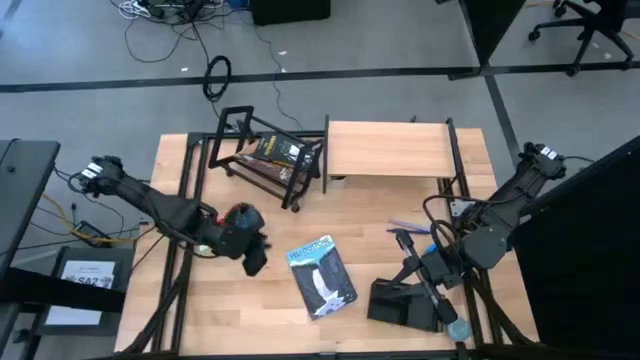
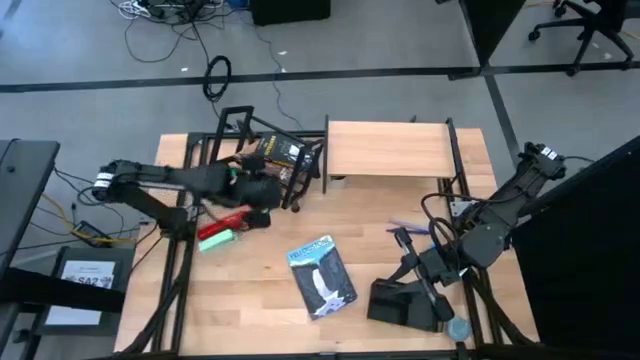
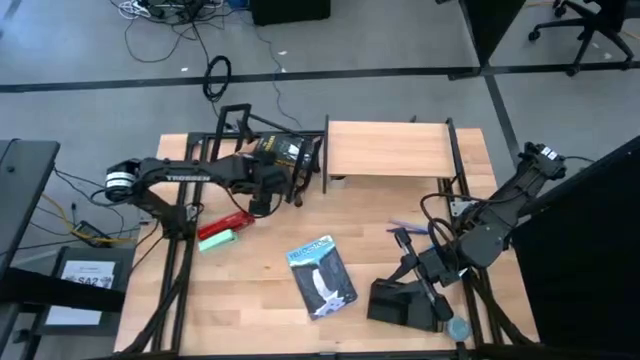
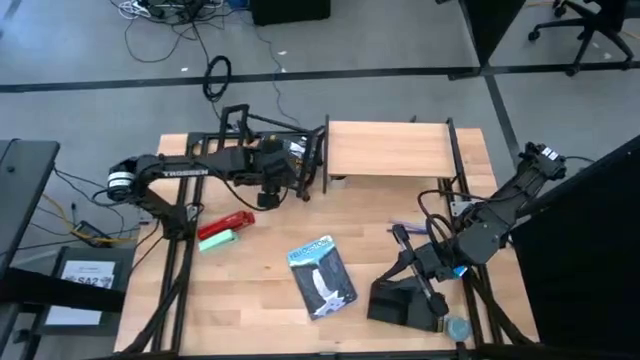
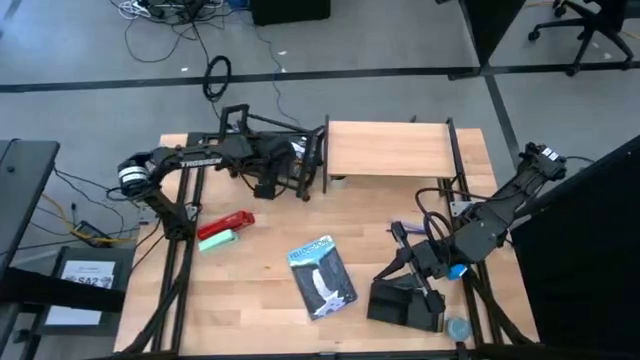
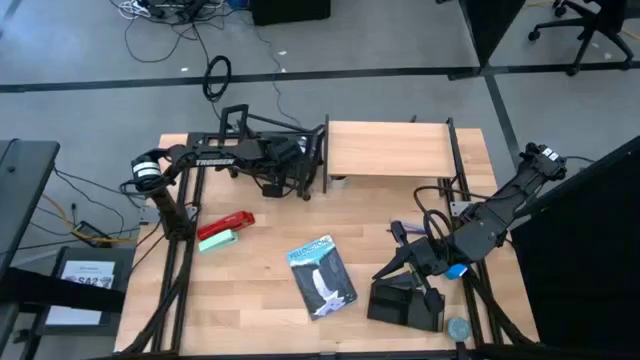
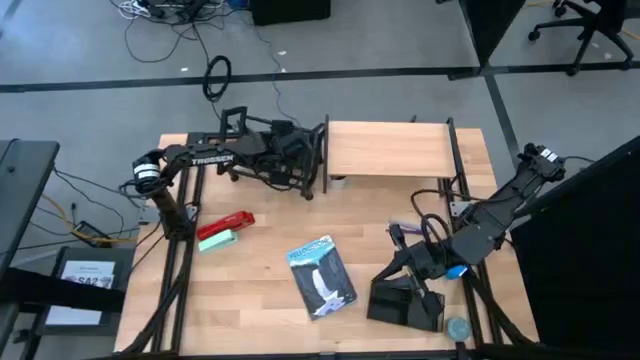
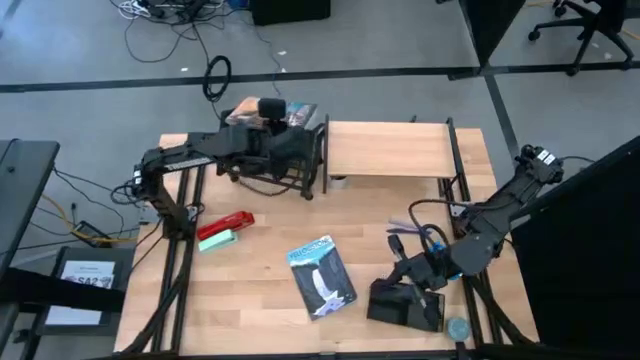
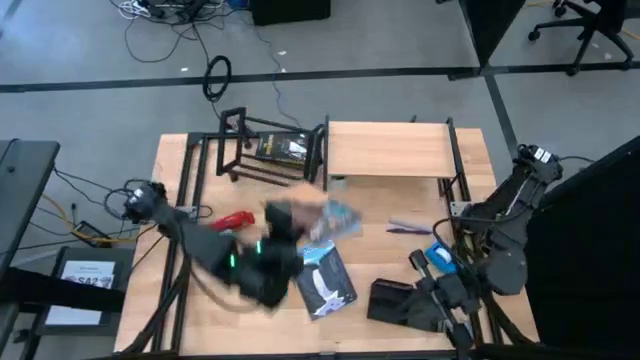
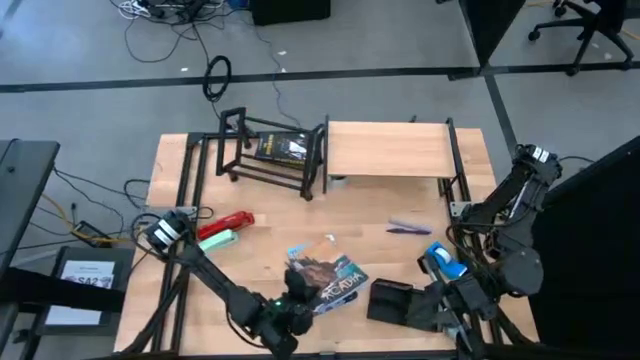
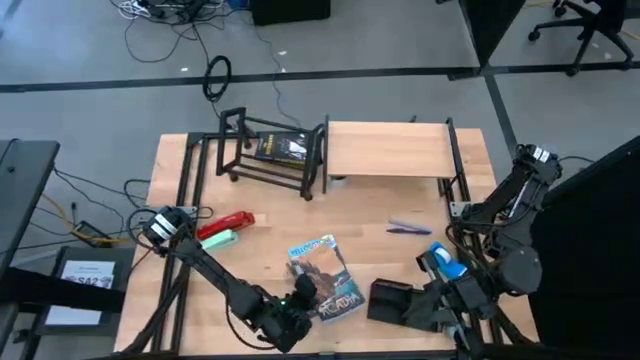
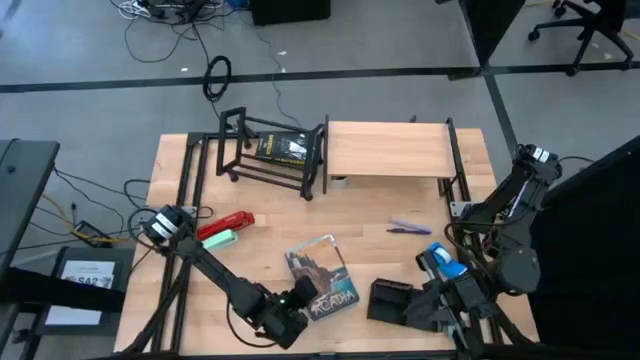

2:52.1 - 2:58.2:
Task: Stock shelves
Remove the brown book from the black bookshelf

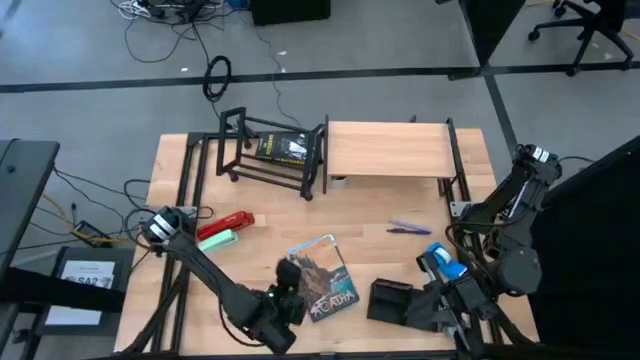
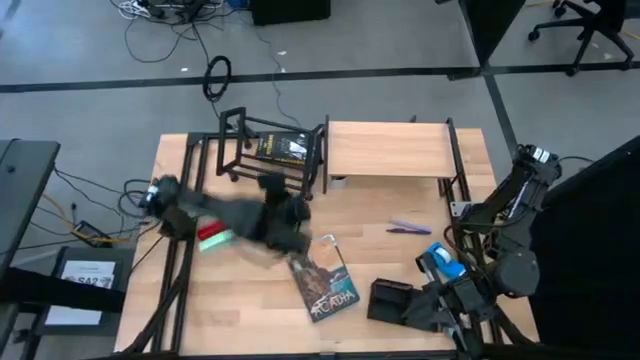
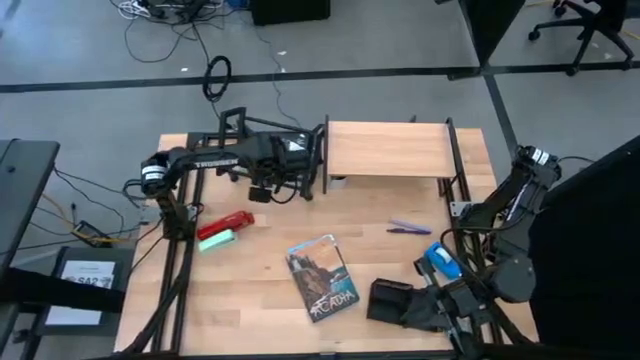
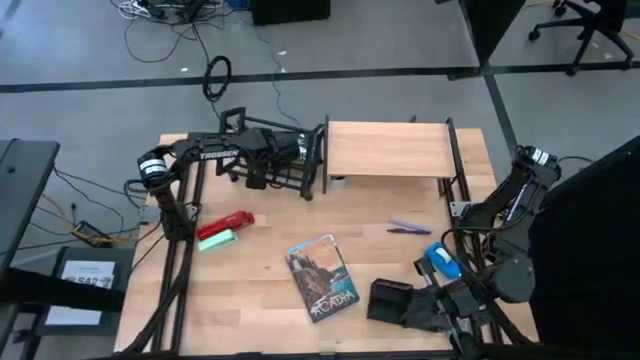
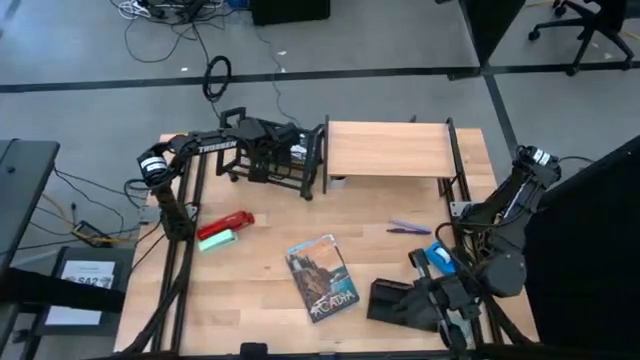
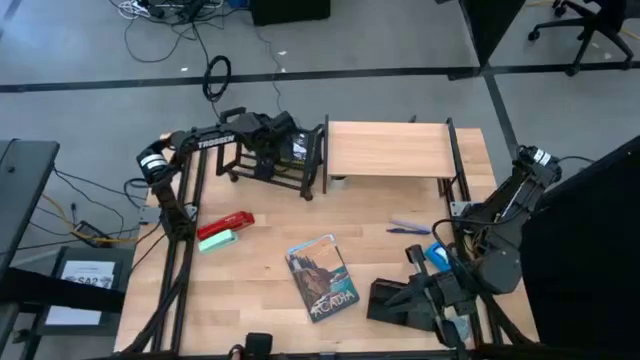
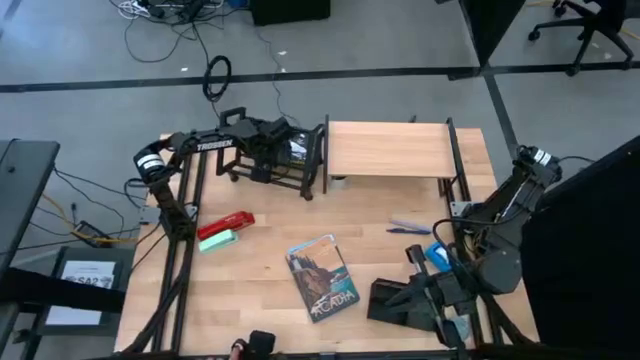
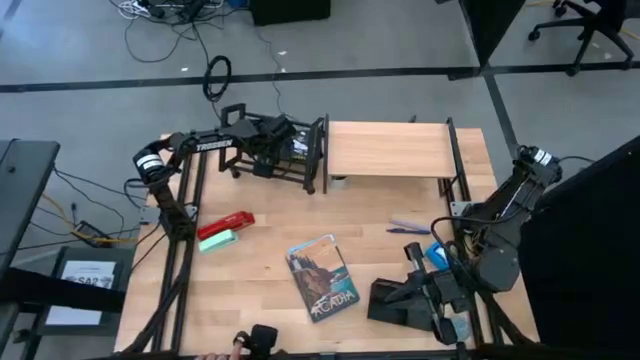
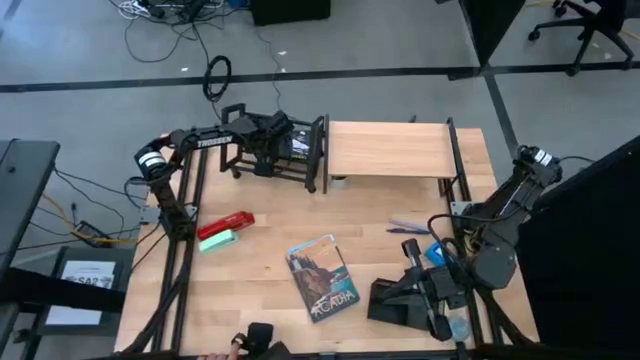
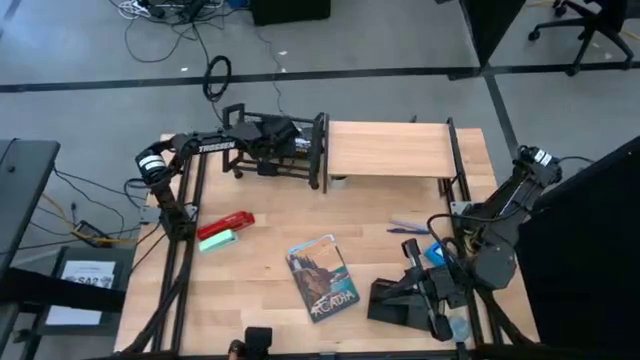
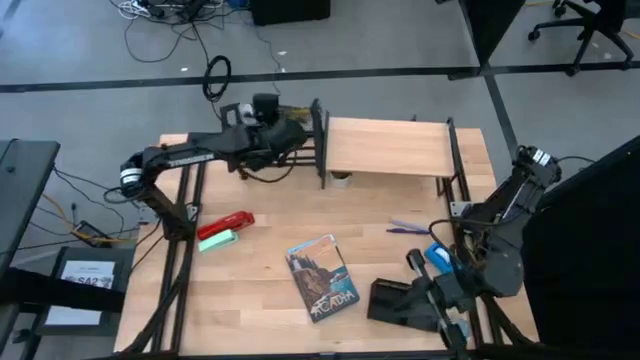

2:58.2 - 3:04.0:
Remove the black book from the black bookshelf

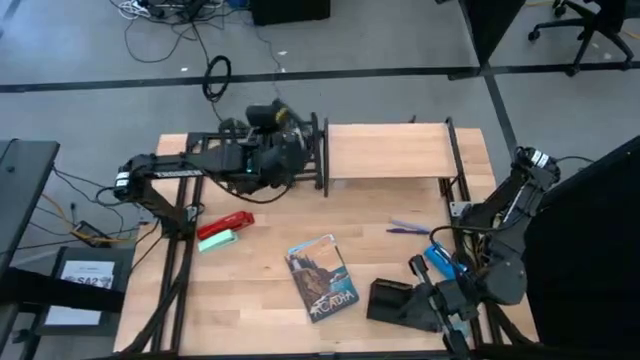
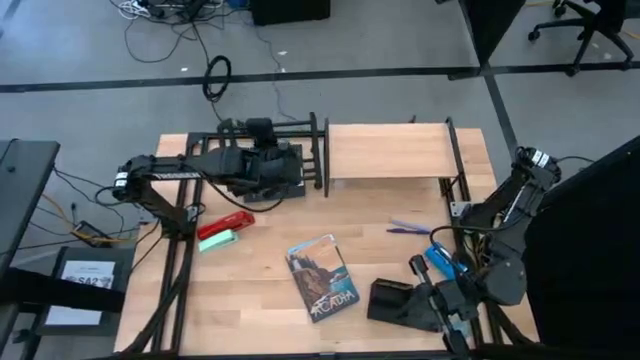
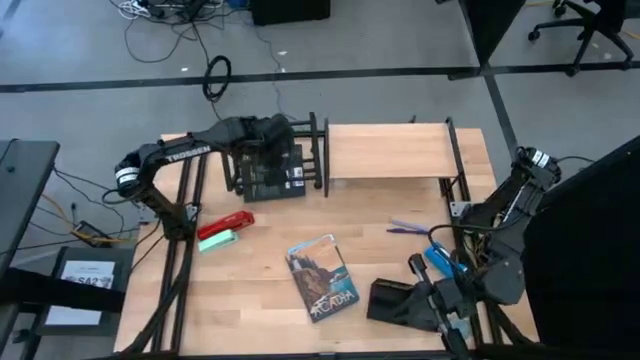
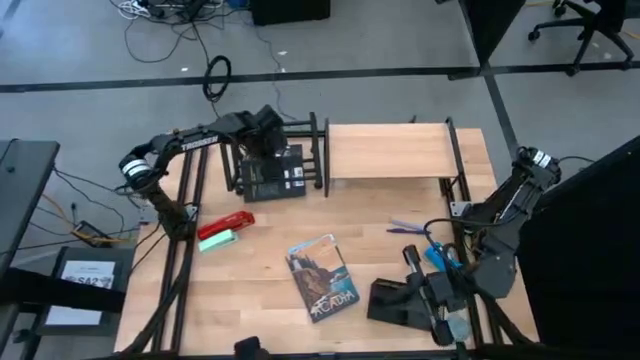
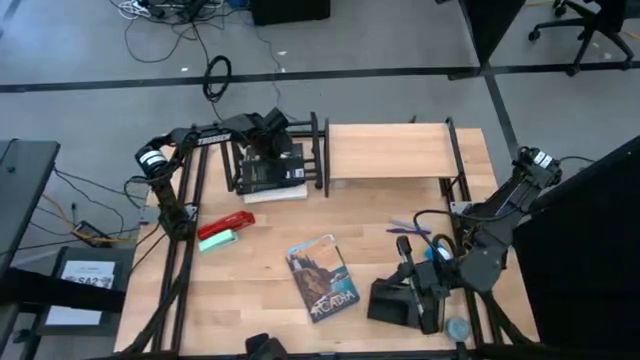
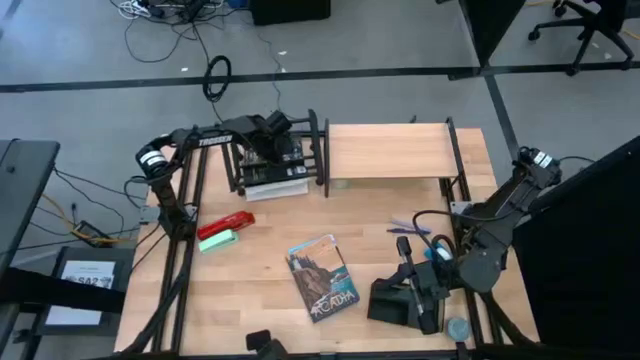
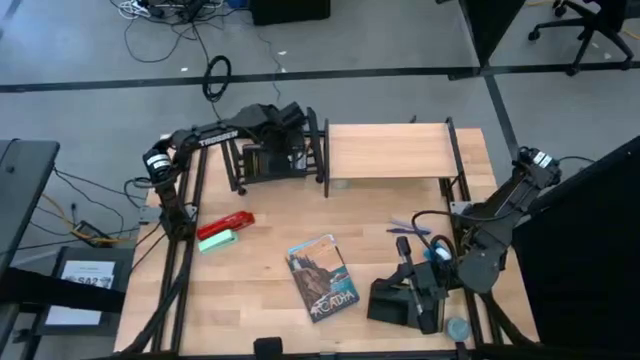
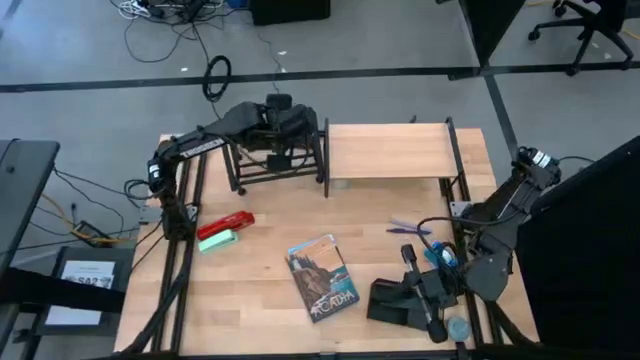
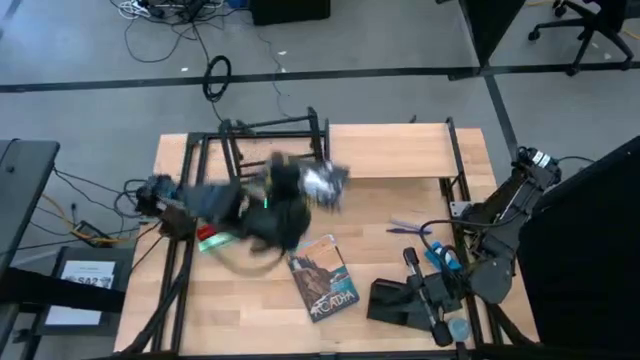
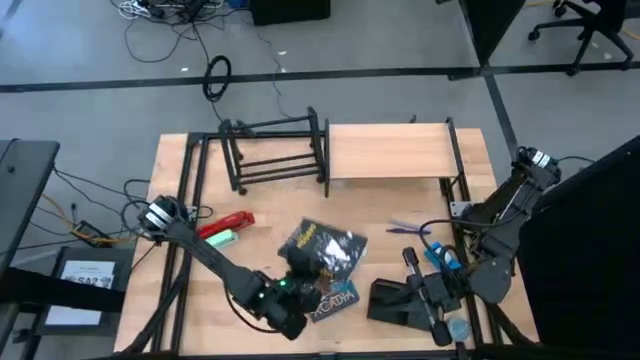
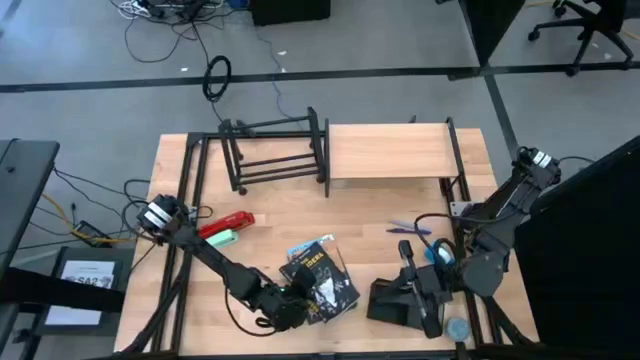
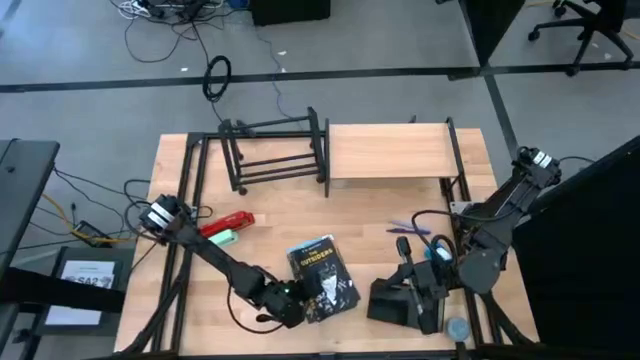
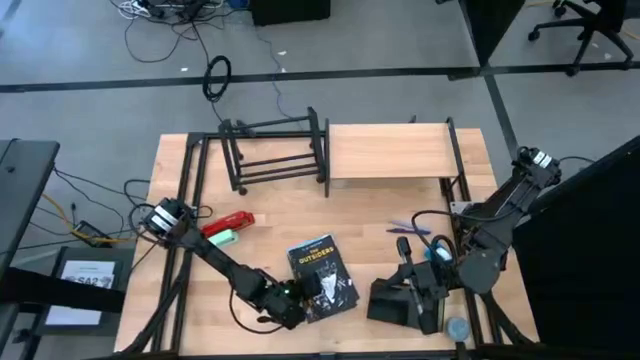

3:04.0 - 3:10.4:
Remove the black book from the black bookshelf

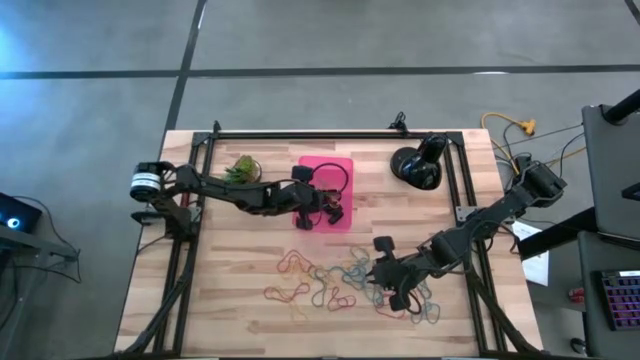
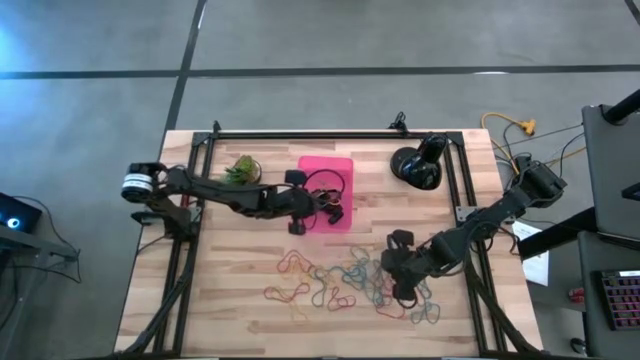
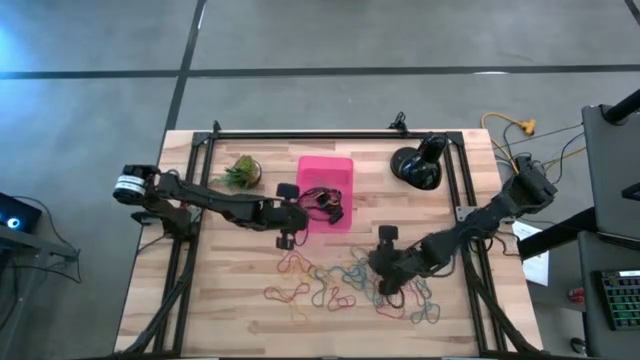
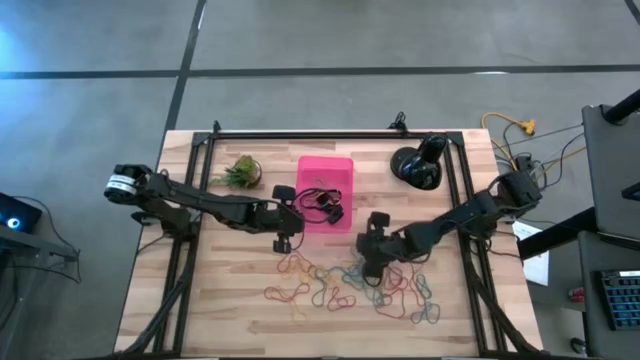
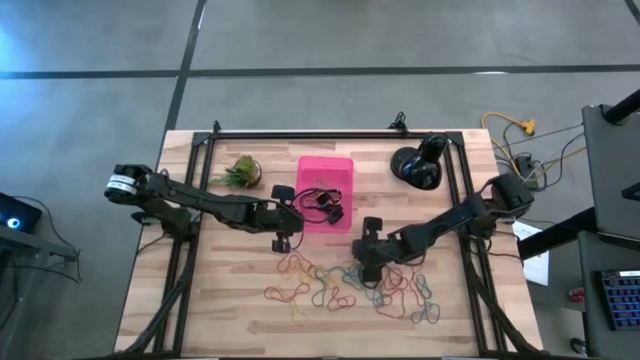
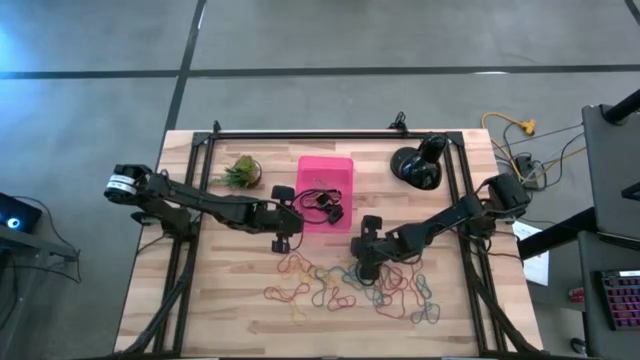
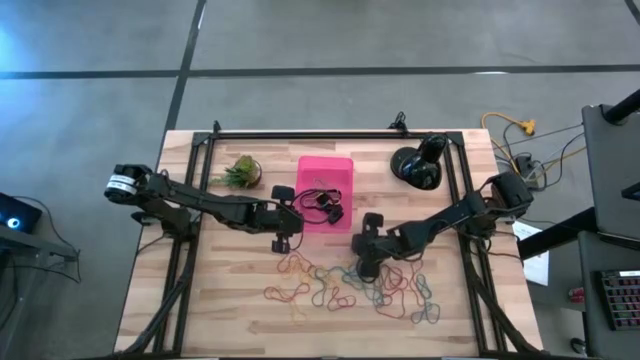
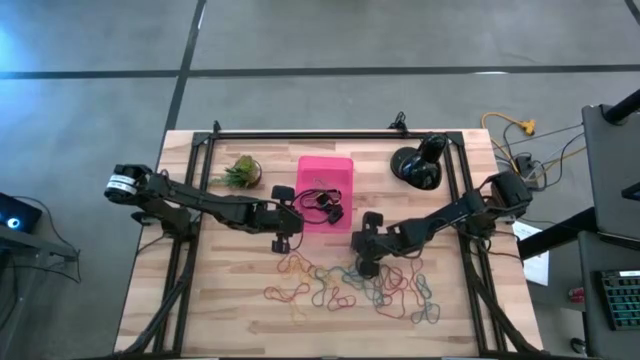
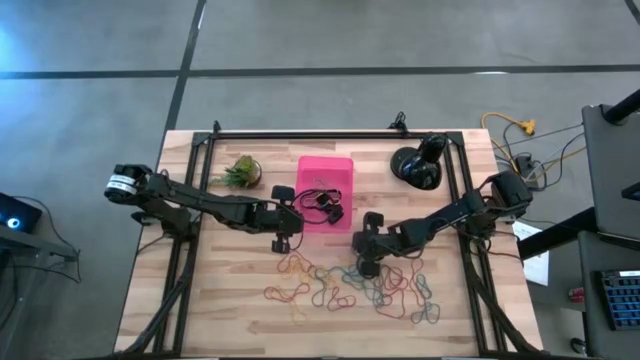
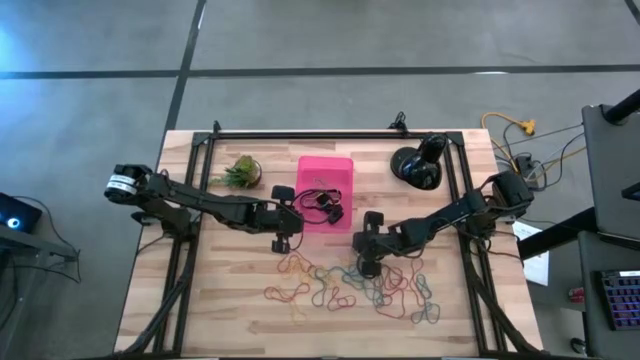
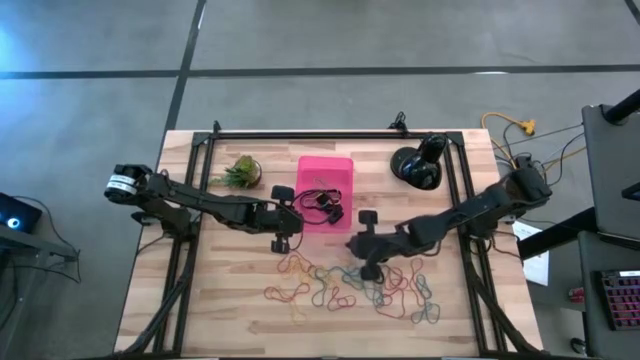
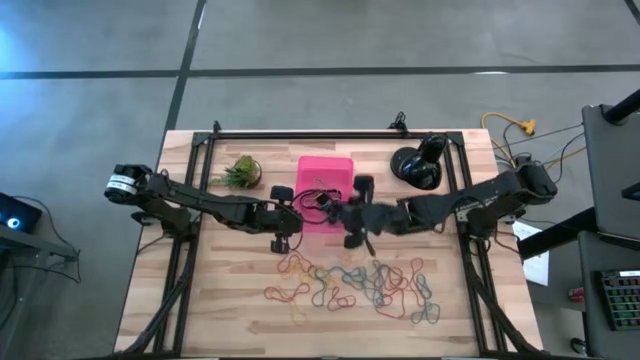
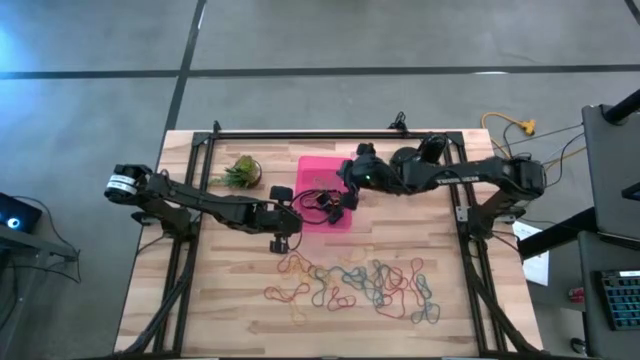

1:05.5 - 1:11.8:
Task: Pick and place rubber bands into bin
Put the blue rubber bands into the pink bin
